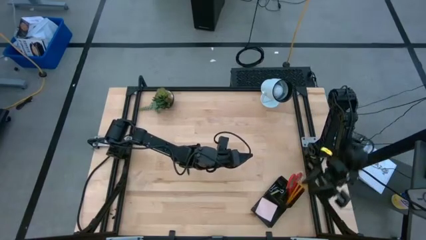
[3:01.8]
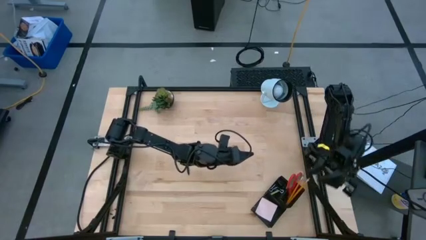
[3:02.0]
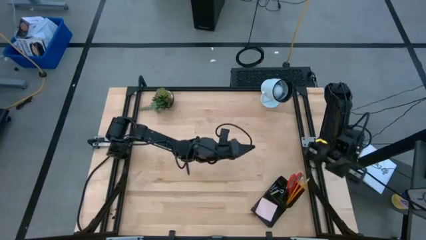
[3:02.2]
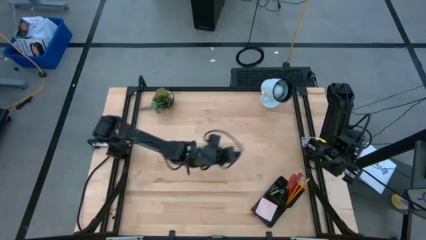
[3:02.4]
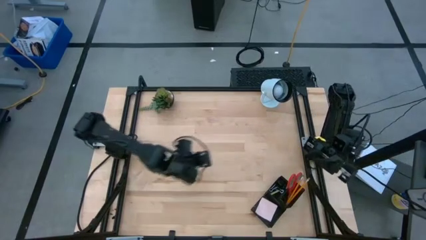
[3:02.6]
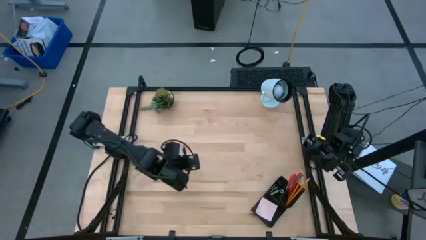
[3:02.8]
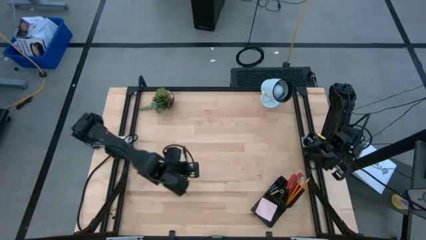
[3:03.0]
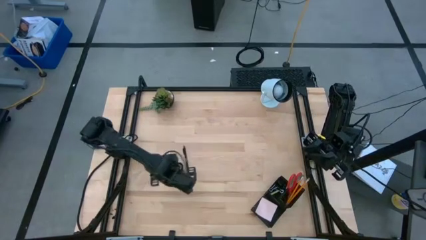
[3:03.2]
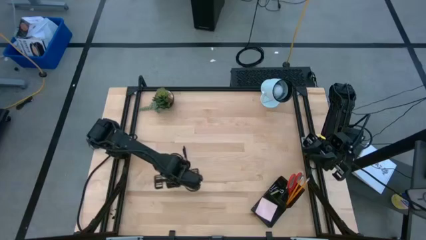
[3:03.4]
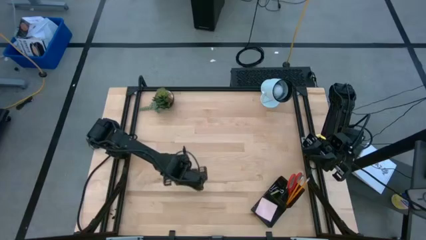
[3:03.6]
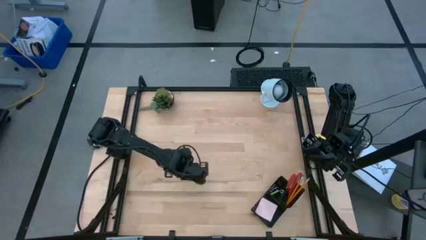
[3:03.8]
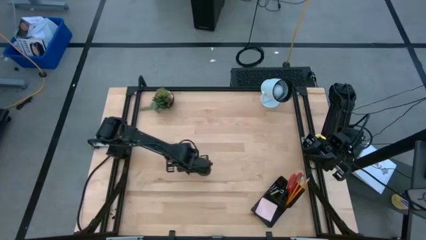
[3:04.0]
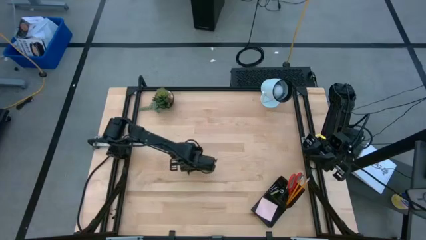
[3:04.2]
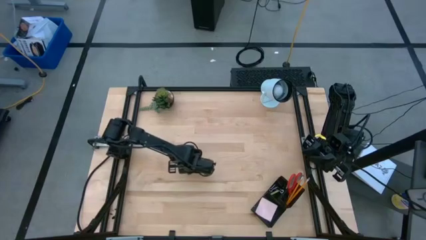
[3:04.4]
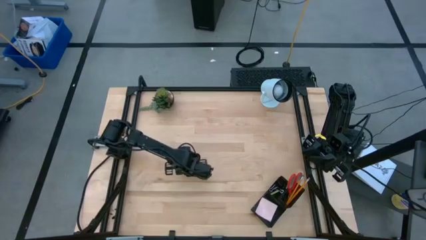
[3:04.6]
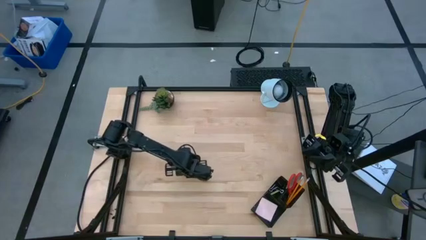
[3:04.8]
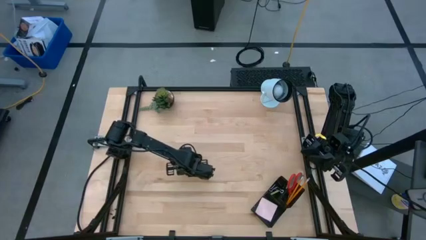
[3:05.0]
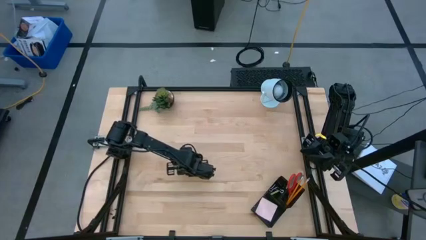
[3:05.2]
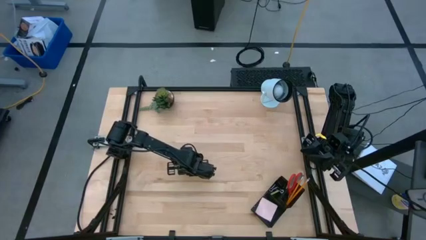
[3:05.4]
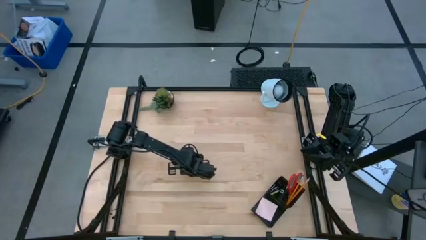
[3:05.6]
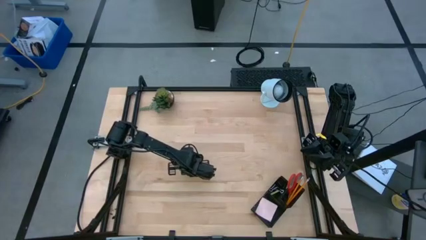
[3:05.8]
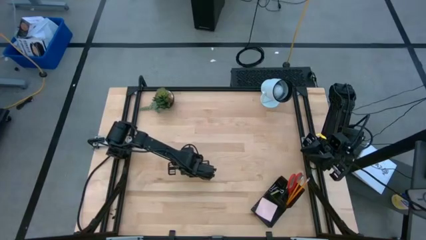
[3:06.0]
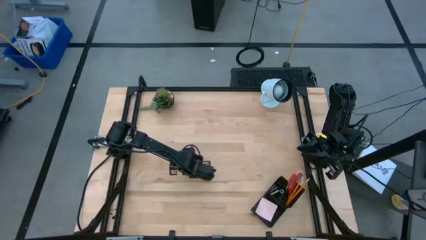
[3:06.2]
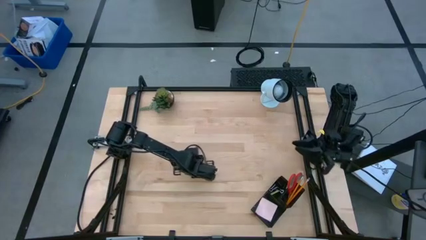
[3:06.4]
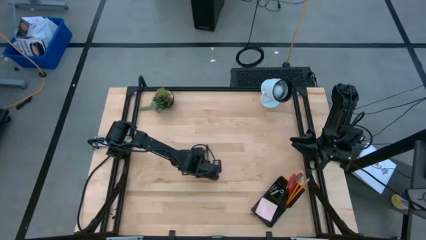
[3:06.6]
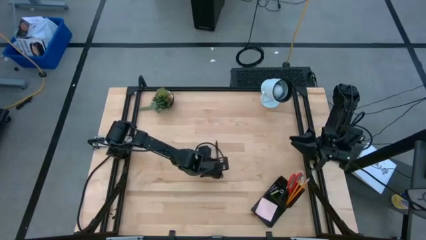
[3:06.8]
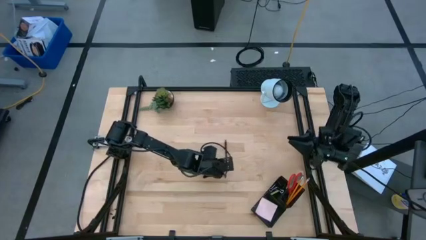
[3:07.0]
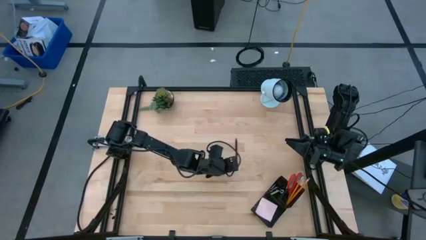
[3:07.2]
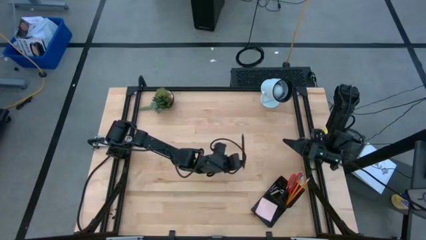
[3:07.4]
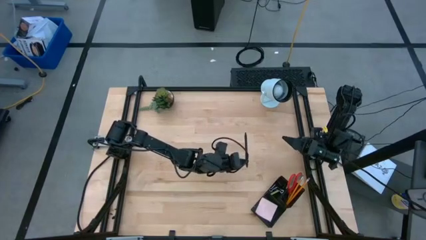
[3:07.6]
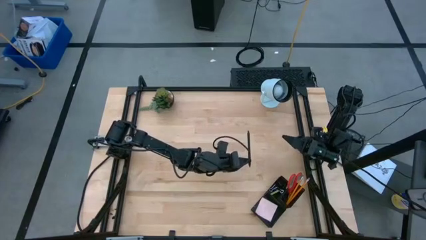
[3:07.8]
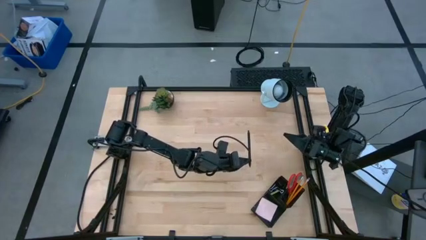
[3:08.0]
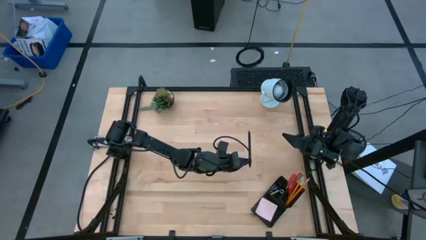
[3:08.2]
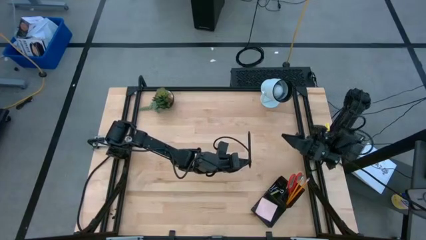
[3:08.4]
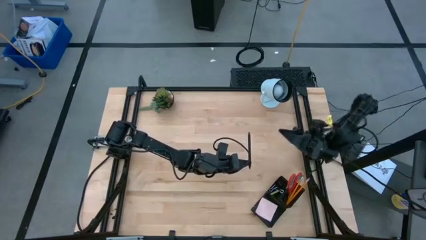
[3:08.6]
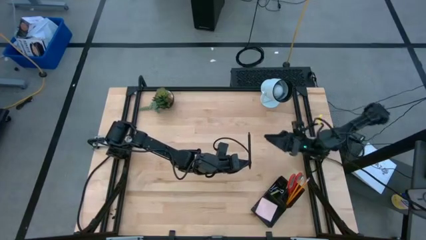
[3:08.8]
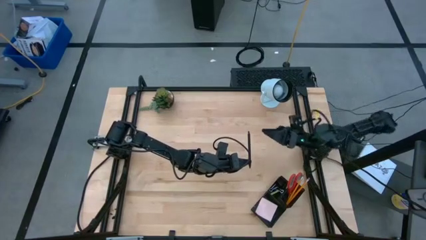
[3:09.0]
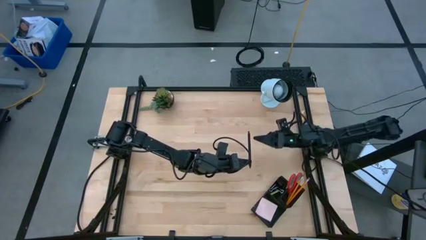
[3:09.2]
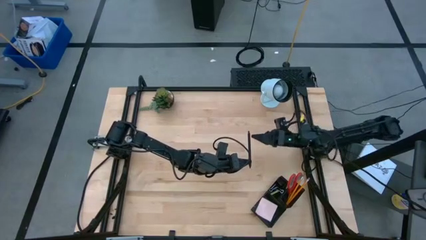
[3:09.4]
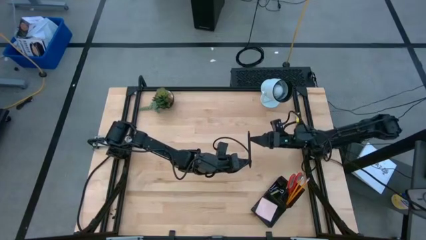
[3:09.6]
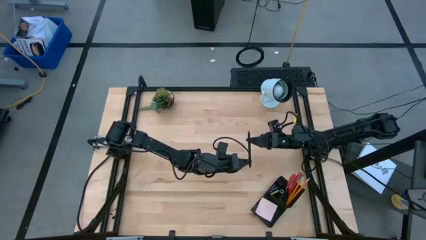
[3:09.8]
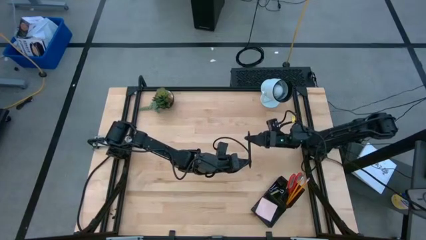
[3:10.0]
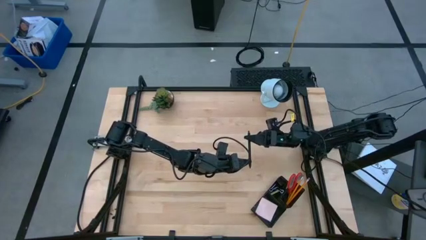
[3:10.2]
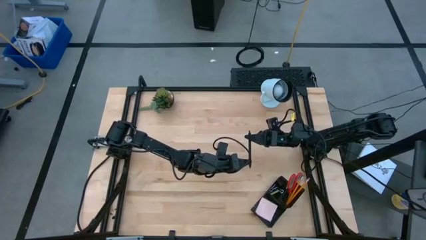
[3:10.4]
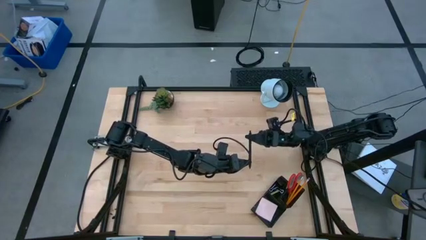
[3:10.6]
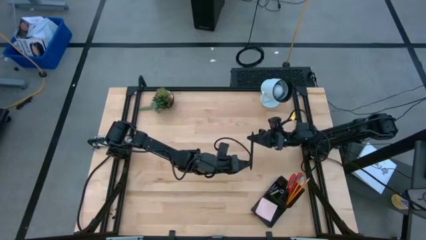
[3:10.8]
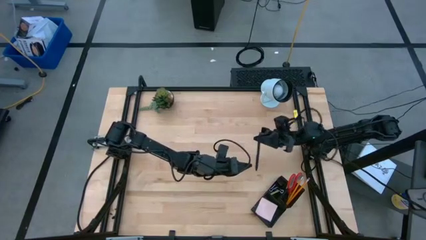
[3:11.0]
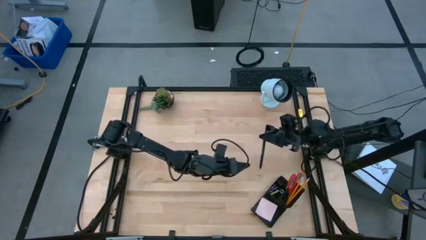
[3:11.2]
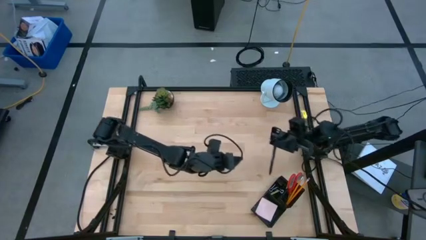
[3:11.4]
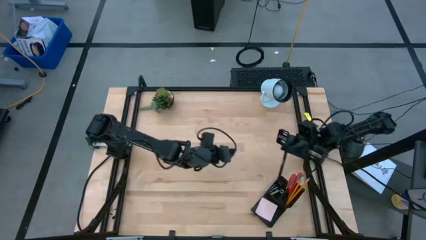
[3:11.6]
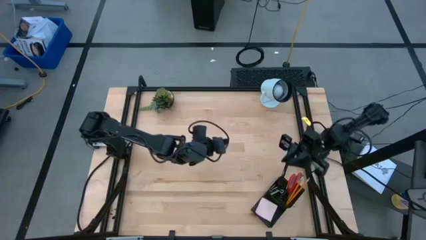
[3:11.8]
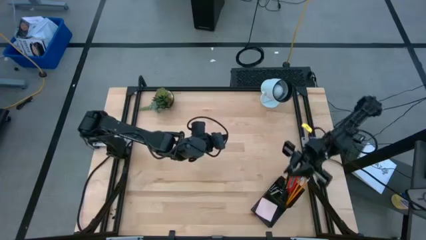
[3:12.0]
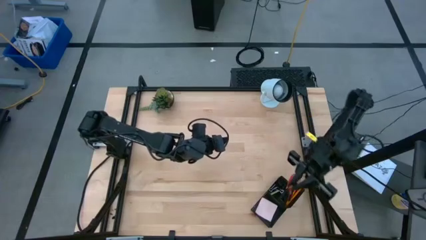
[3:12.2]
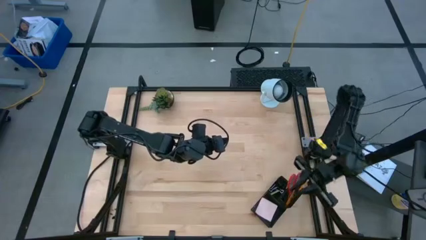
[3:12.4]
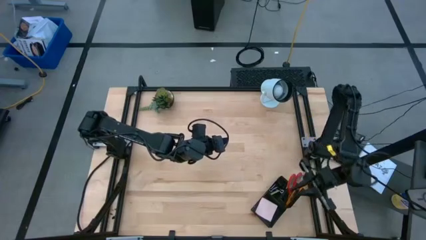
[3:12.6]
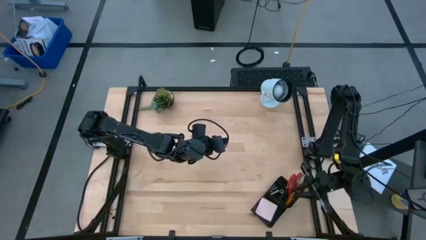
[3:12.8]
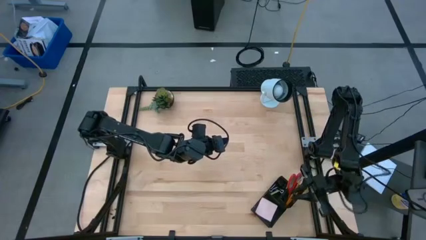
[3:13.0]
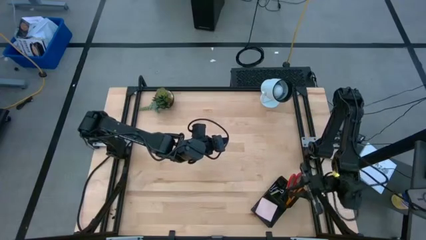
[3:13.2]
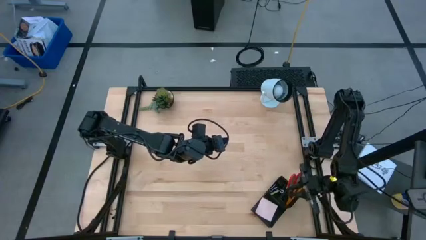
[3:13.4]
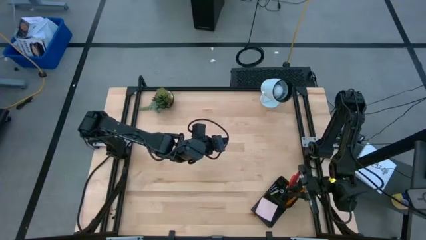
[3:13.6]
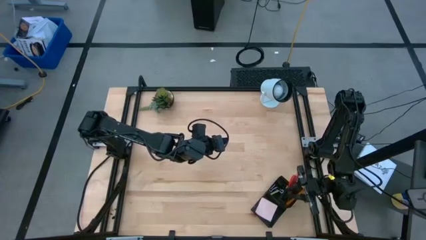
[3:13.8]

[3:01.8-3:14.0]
Task: Pick and place office supplies into organizer
Put the black pen into the desk organizer

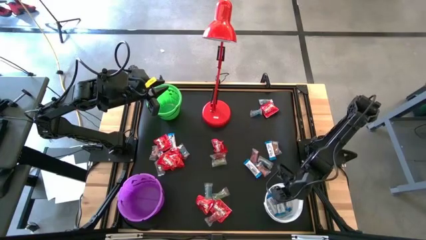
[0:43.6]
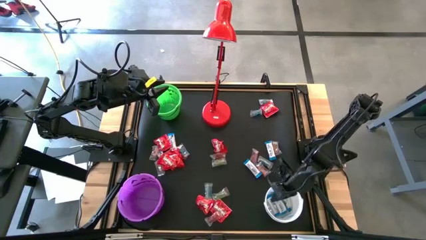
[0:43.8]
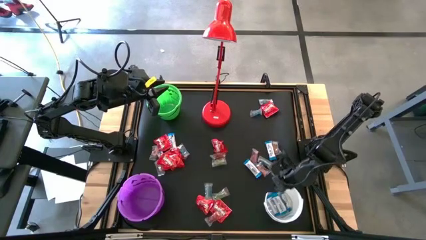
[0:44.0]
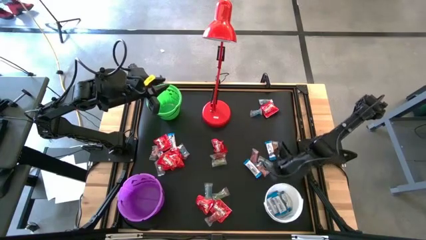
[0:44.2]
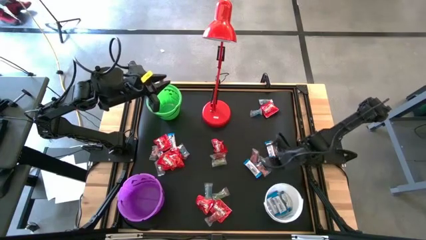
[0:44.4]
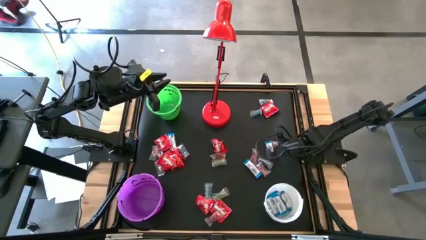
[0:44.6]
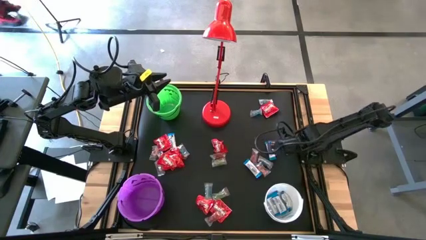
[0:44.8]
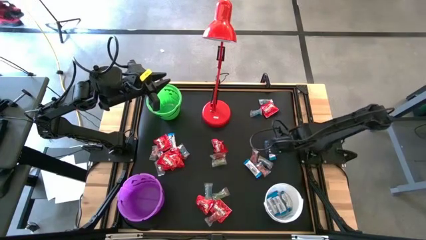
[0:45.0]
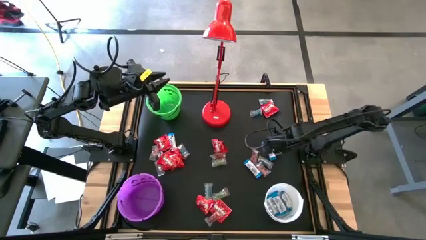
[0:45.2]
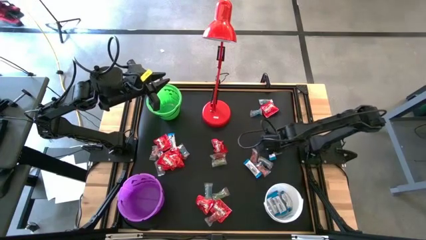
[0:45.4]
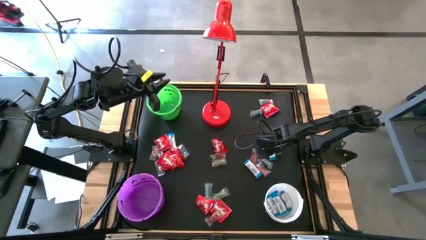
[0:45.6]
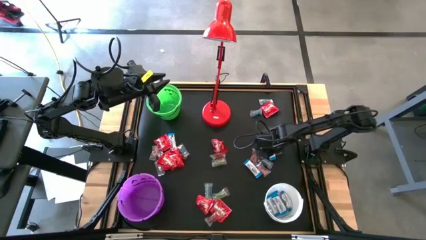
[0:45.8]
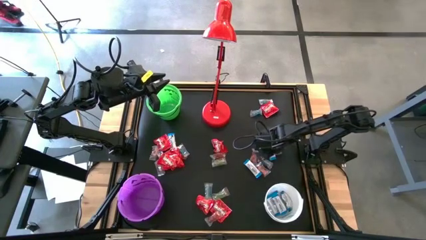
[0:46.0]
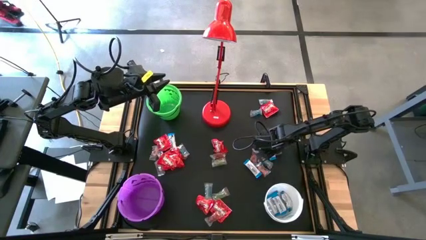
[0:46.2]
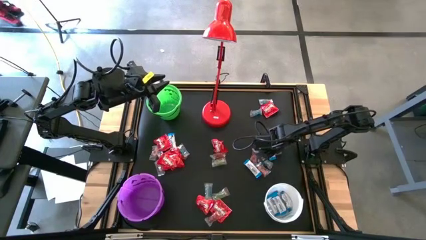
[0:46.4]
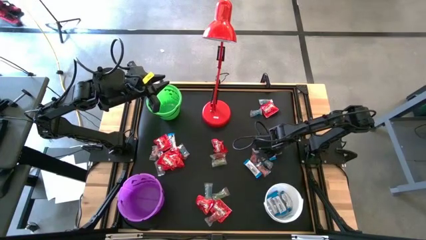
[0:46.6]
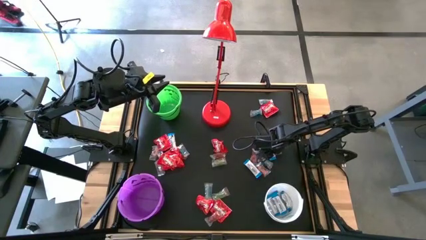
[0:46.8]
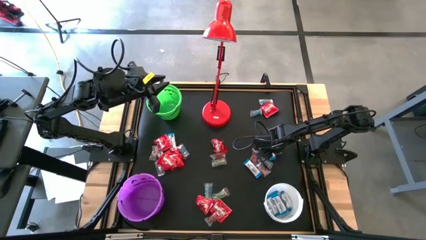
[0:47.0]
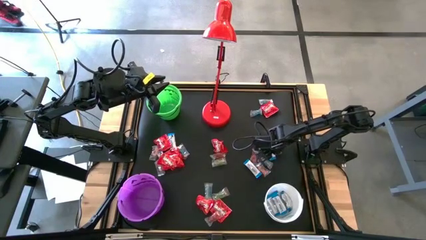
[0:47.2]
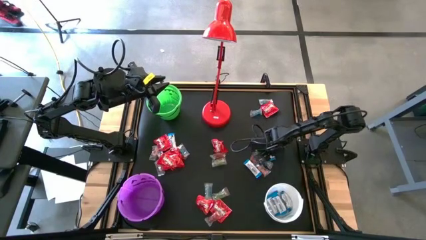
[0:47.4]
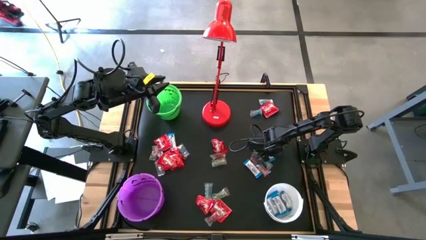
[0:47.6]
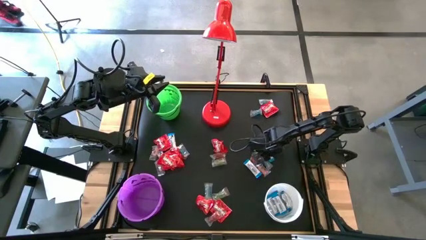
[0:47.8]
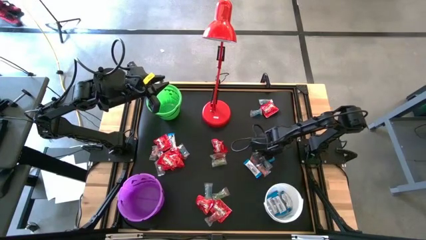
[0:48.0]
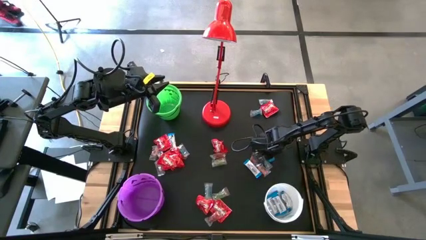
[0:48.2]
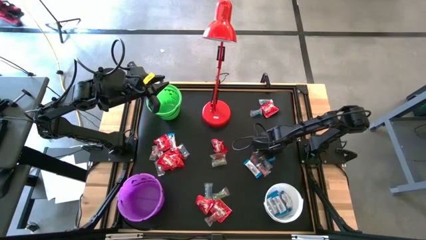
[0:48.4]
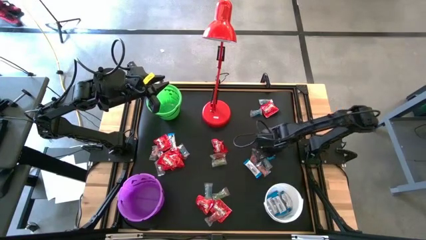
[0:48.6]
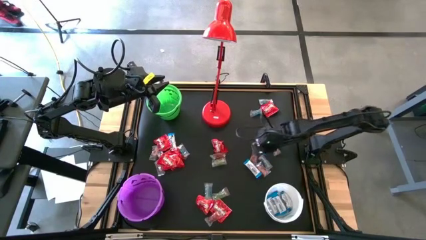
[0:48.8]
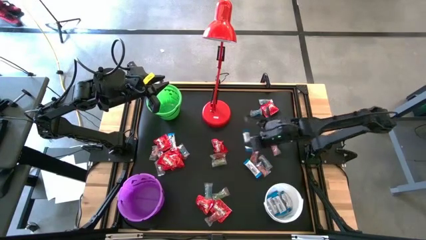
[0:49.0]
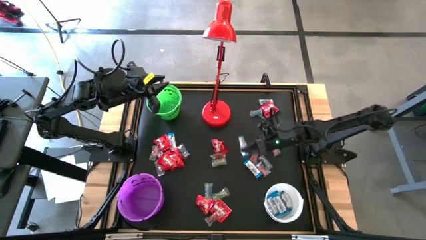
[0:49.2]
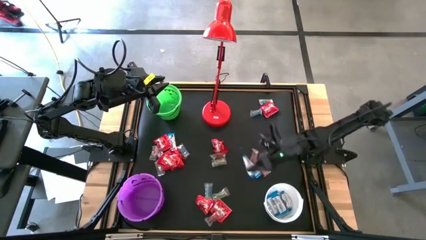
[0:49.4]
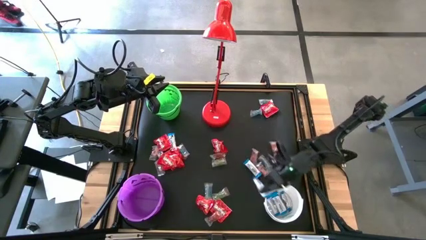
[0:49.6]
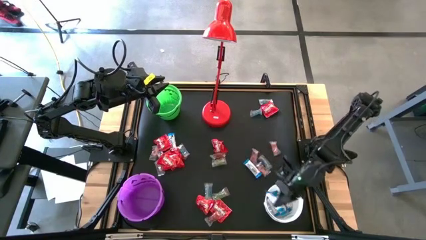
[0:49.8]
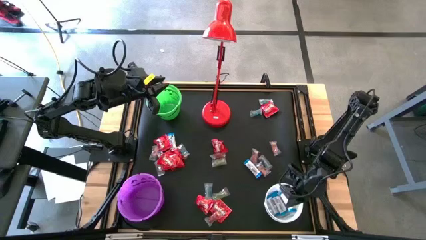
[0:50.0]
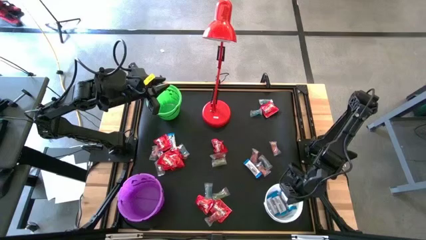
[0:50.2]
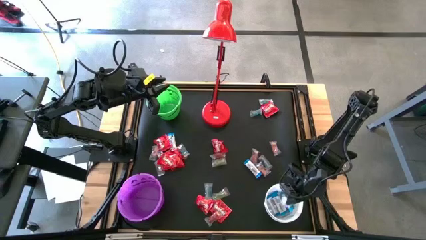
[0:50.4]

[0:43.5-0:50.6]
Task: Sort candy
Put the white chocolate into the white bucket
